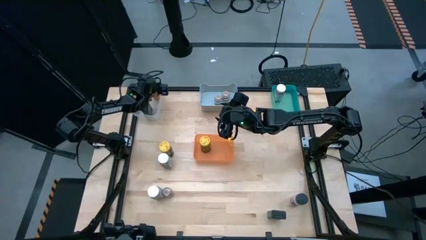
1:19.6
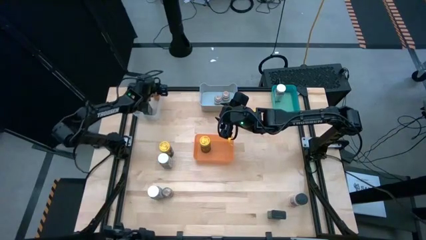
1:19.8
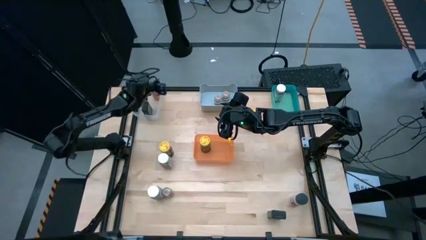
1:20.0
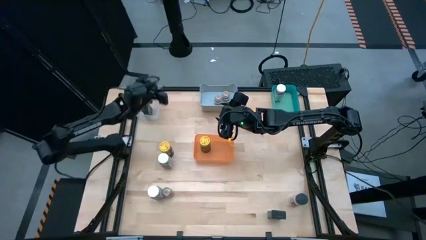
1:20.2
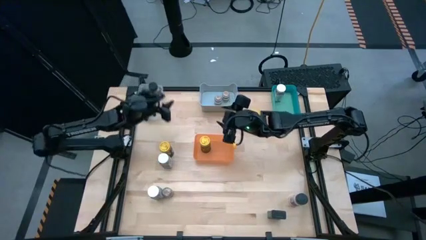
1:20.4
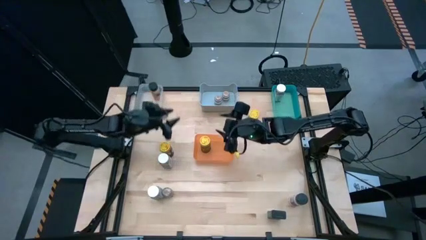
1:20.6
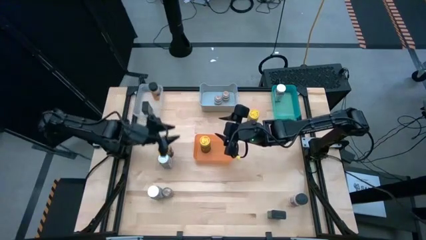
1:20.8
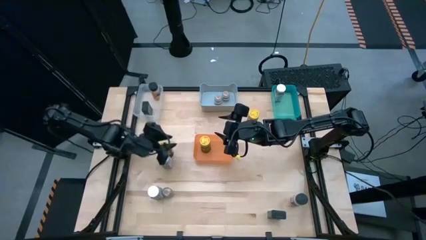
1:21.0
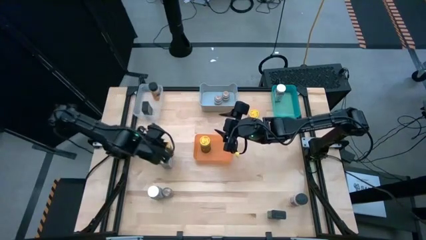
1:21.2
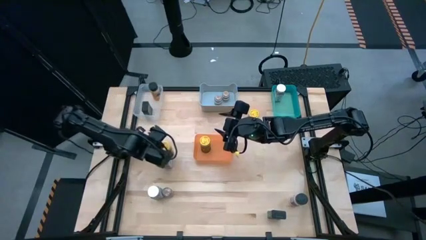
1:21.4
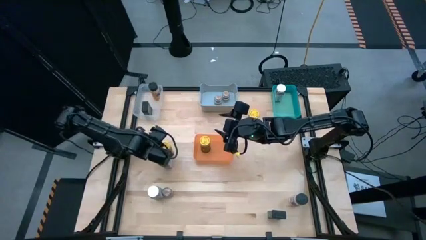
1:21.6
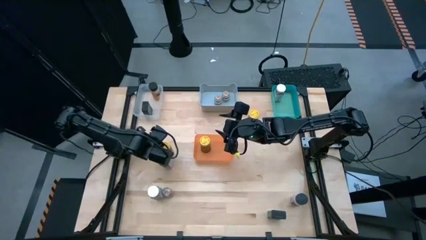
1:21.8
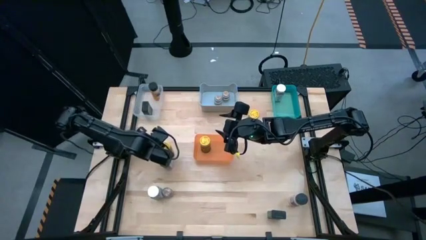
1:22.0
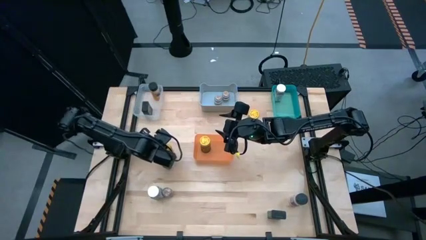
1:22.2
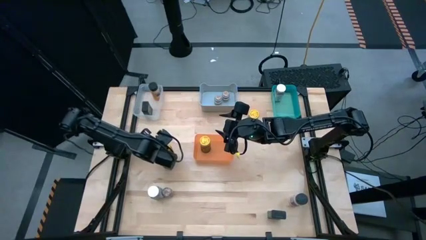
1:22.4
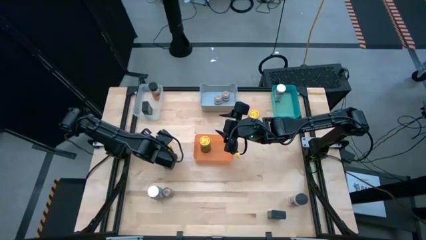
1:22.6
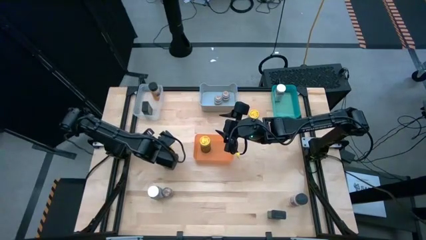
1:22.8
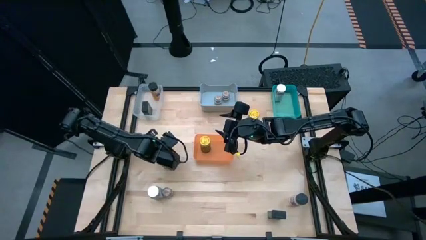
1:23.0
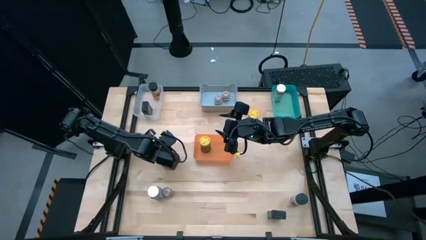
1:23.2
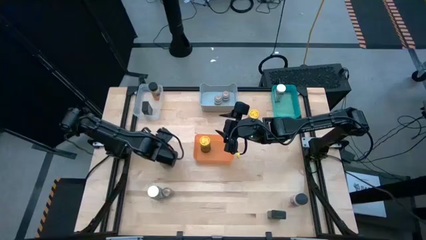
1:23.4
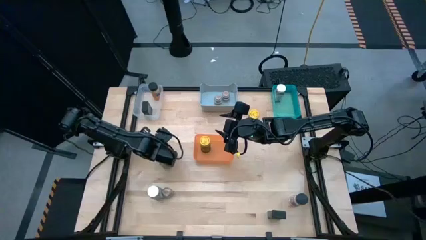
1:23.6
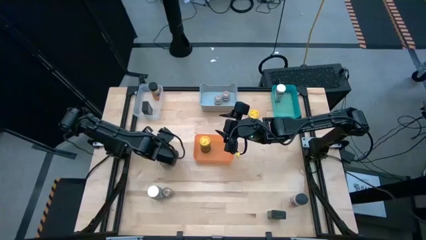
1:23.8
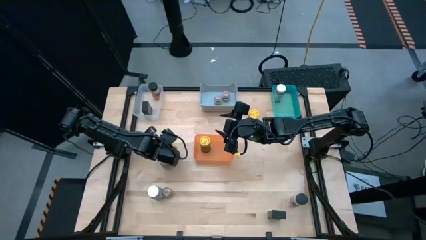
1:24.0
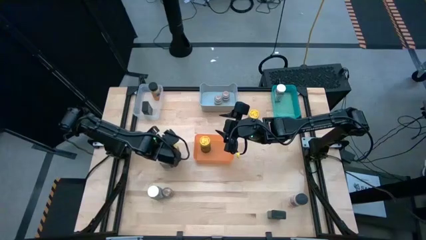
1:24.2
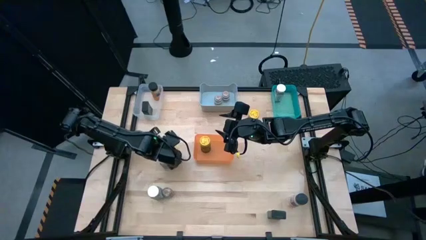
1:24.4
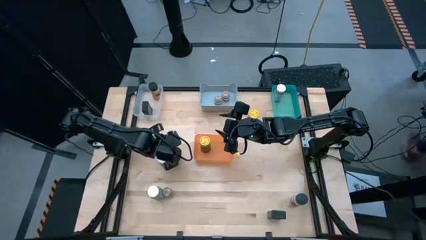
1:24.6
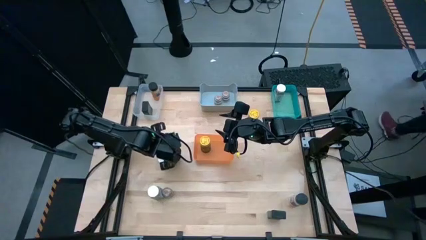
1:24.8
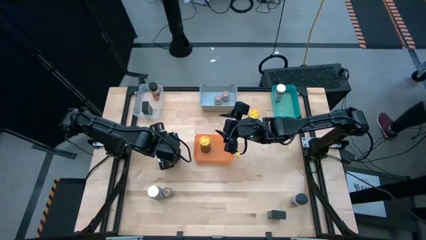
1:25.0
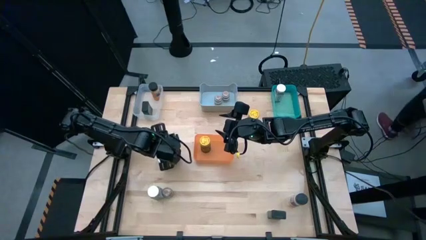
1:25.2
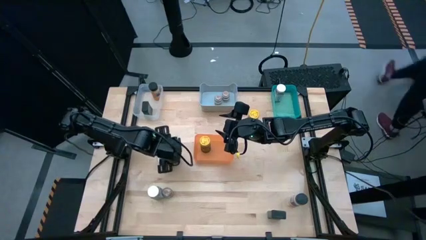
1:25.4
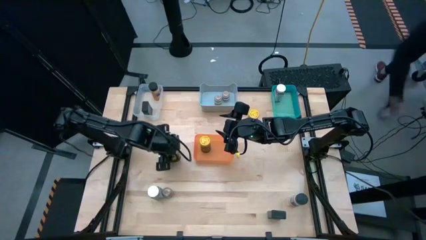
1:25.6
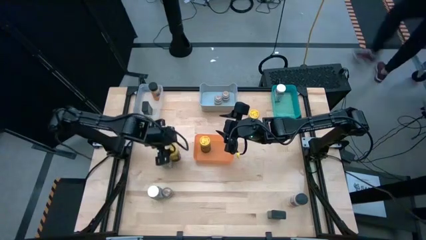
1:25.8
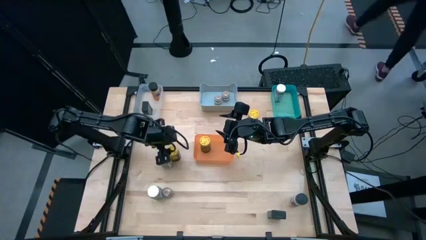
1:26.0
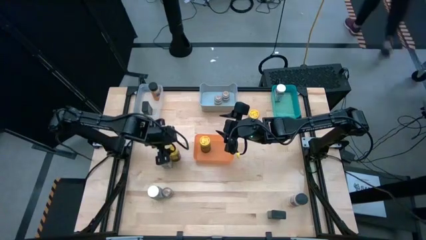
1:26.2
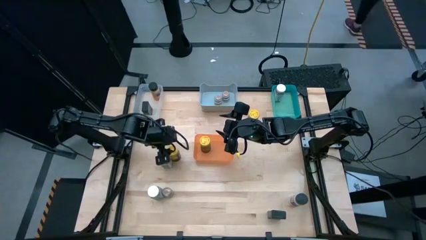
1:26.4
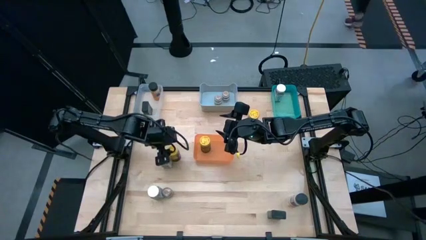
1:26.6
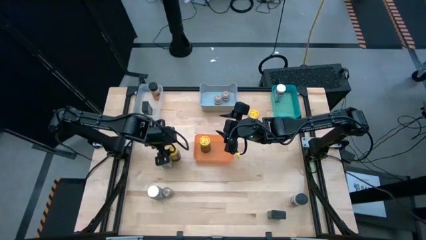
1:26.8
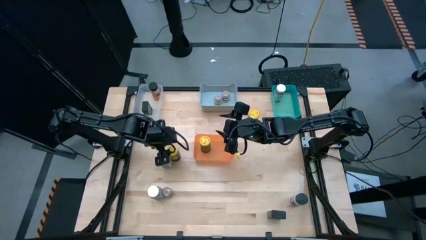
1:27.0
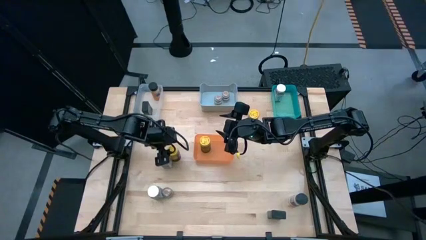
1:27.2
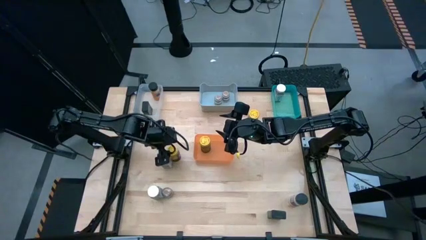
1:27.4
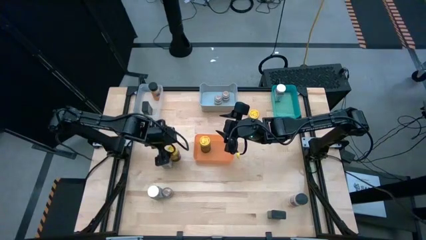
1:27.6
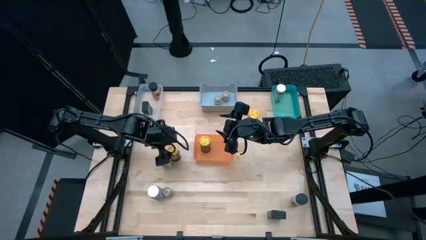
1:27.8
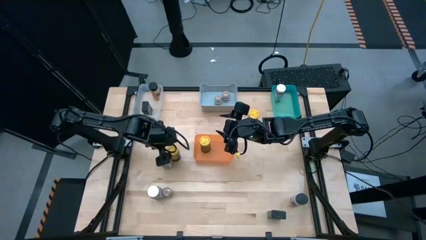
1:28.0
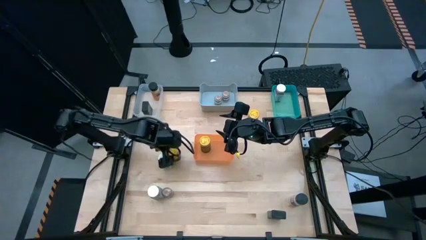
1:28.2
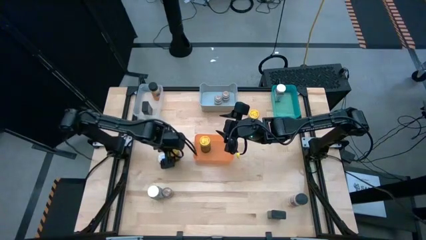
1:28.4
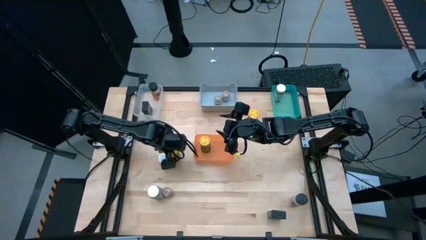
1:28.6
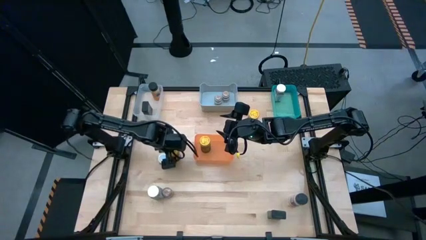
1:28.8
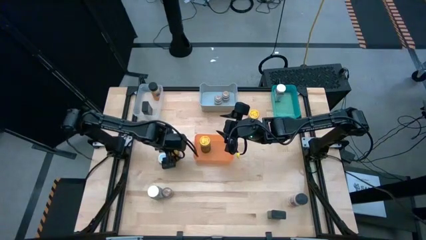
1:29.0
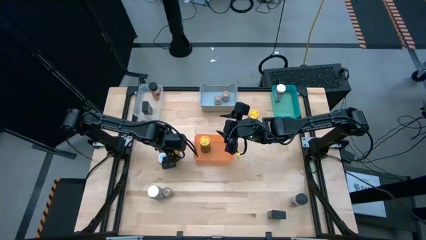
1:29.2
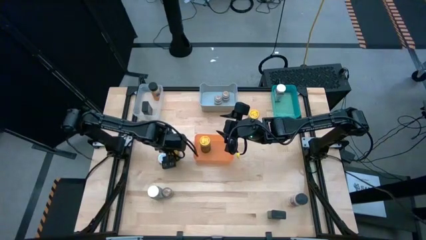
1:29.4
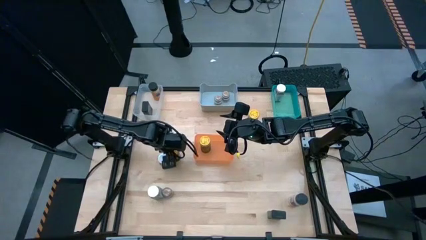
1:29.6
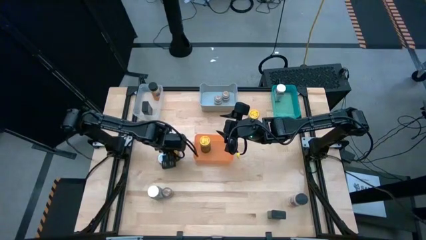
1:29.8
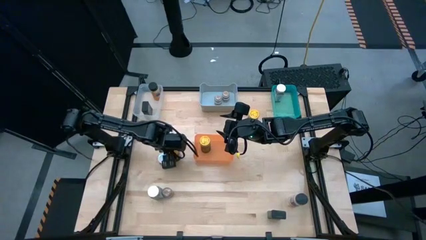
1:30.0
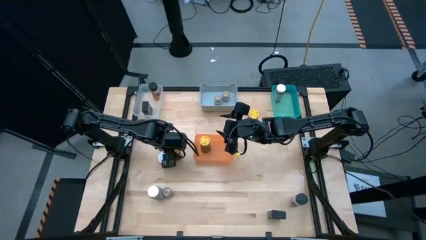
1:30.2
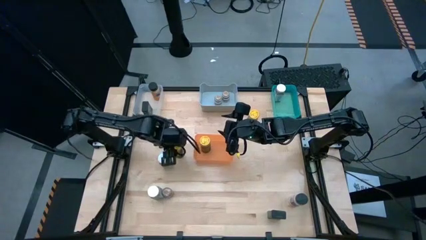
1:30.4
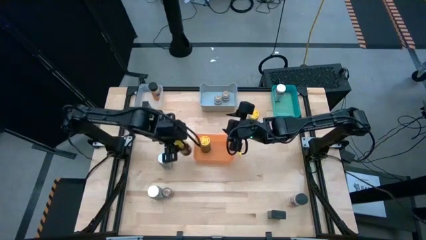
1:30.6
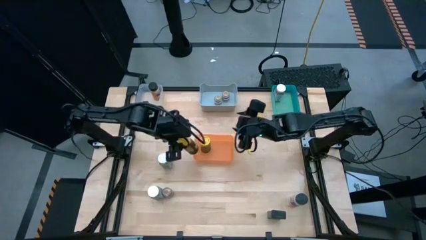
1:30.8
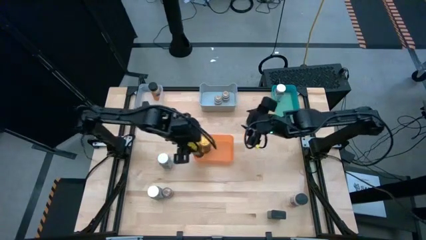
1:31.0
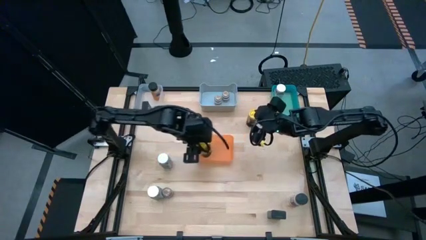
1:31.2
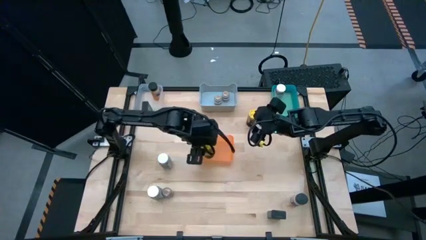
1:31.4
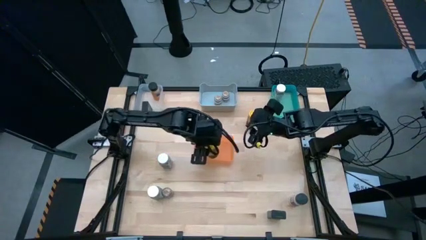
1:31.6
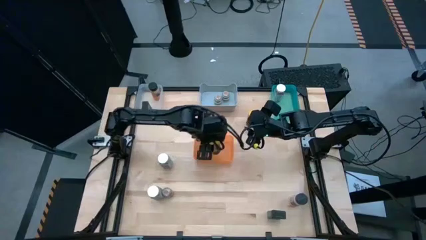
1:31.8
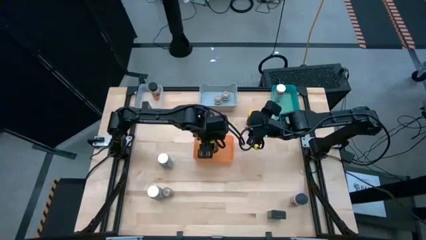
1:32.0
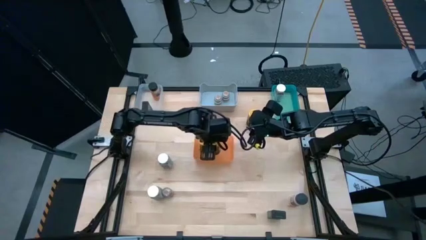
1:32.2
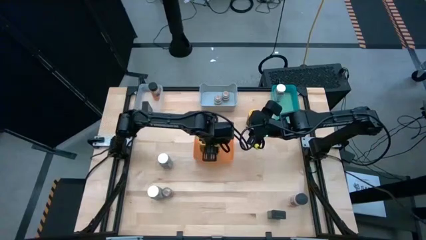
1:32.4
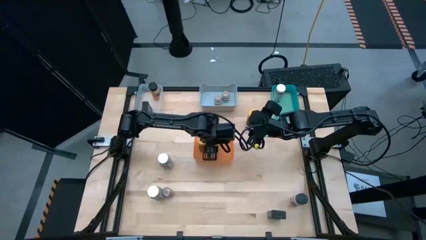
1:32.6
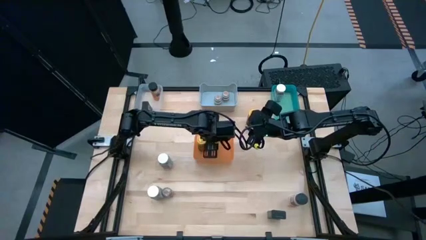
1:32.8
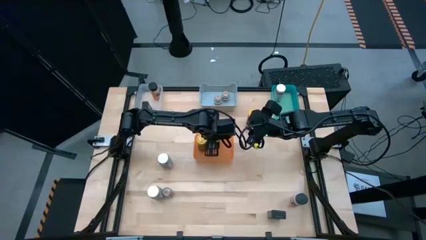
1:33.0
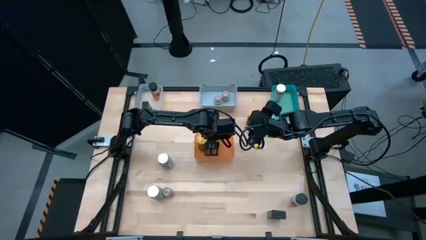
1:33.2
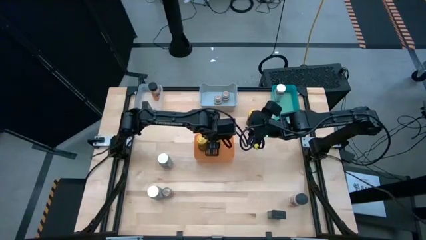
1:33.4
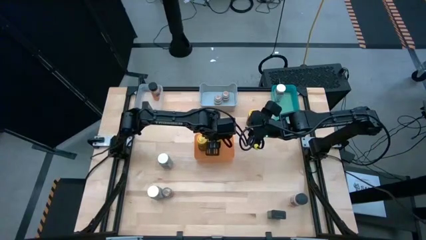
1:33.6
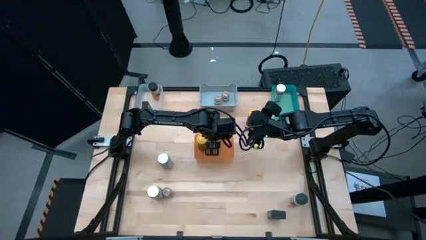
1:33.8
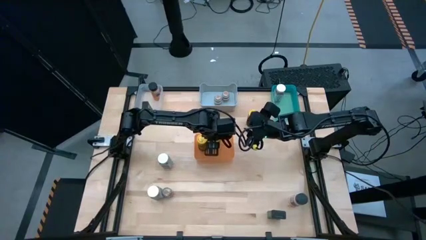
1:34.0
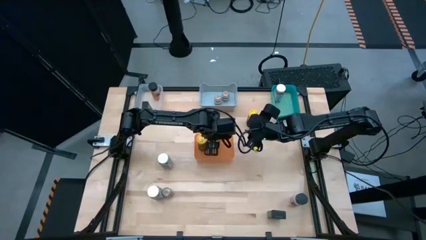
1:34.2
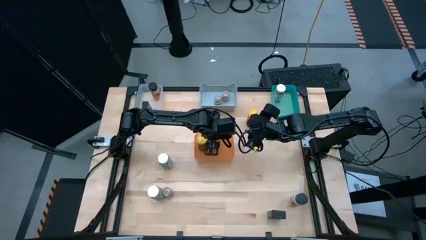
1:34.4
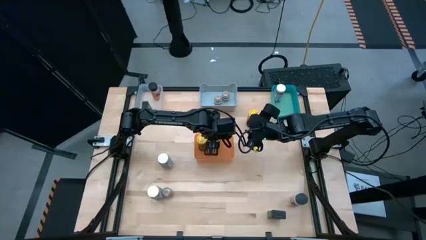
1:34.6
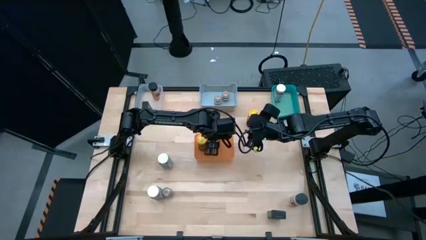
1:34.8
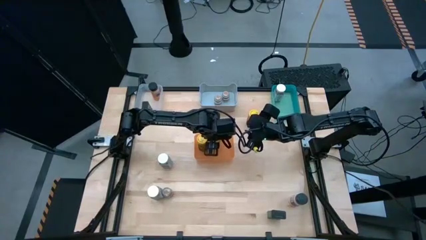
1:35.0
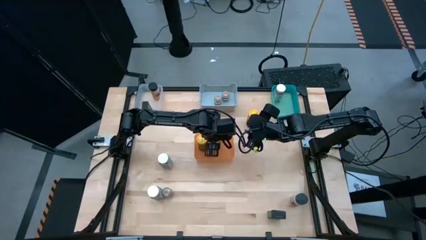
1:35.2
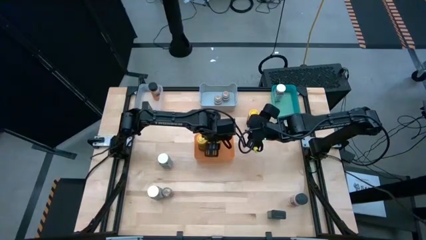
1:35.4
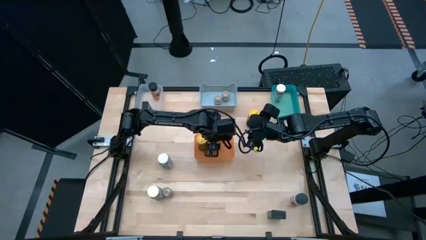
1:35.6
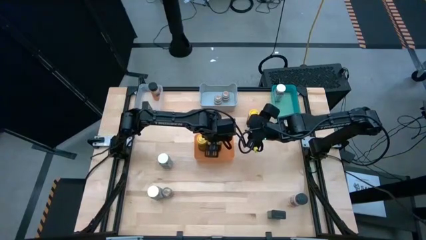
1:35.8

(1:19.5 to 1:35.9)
Task: Sort spices by type
Put the bottom yellow seasoning bottle into the orange bin
